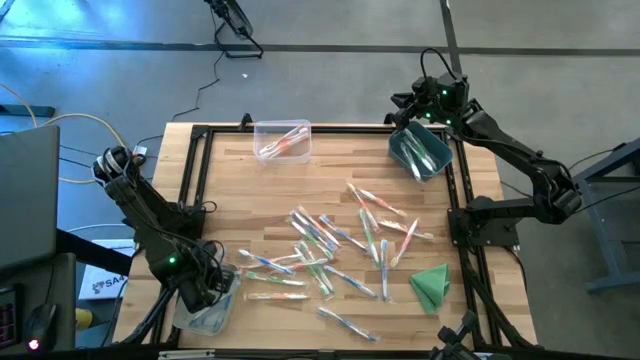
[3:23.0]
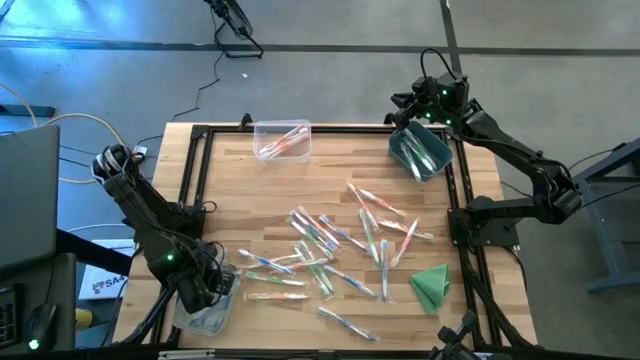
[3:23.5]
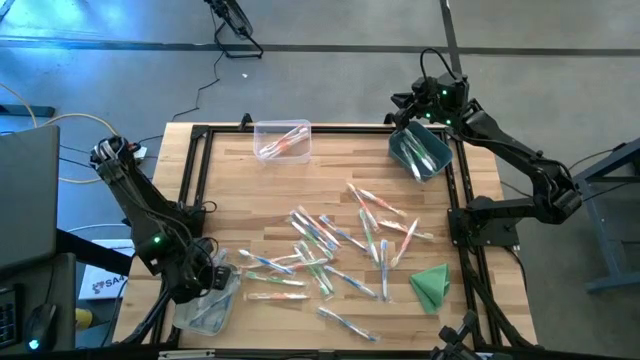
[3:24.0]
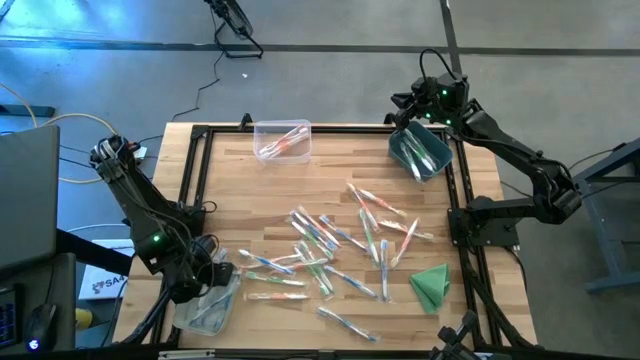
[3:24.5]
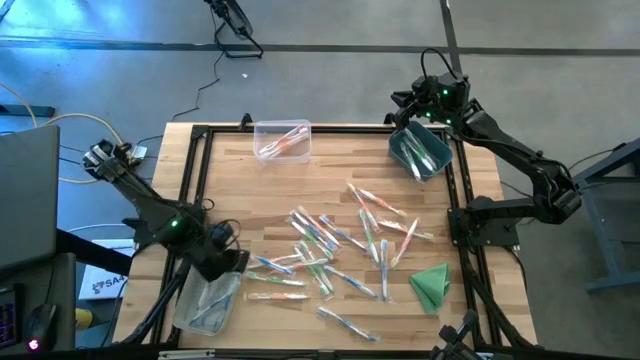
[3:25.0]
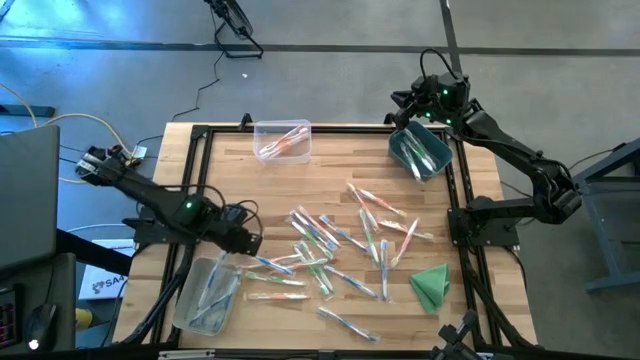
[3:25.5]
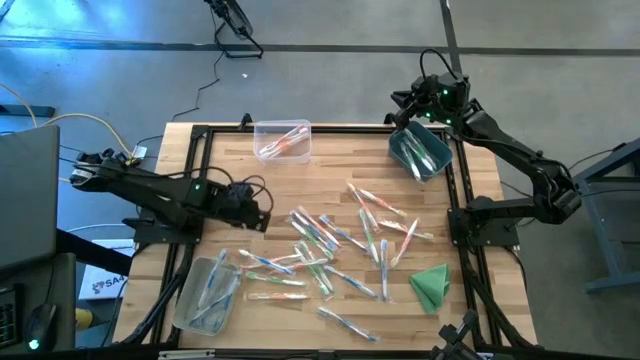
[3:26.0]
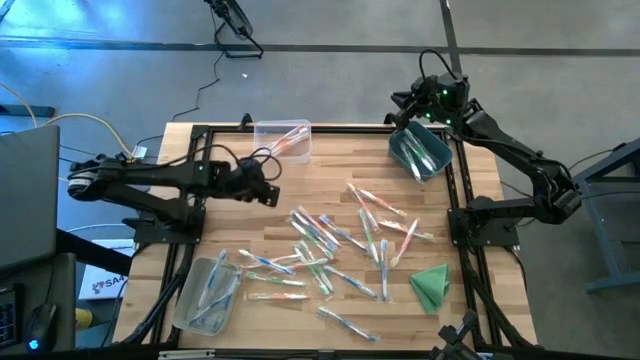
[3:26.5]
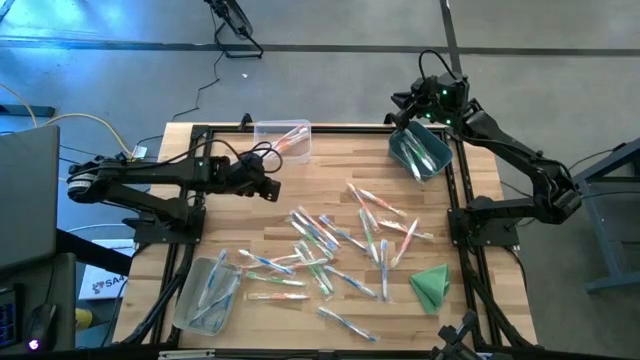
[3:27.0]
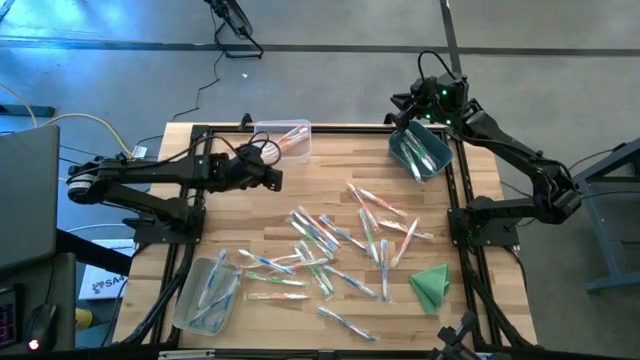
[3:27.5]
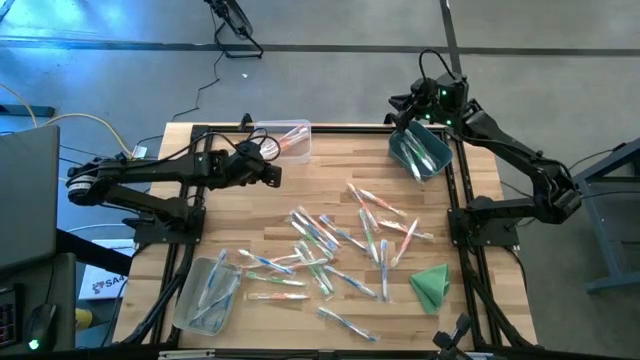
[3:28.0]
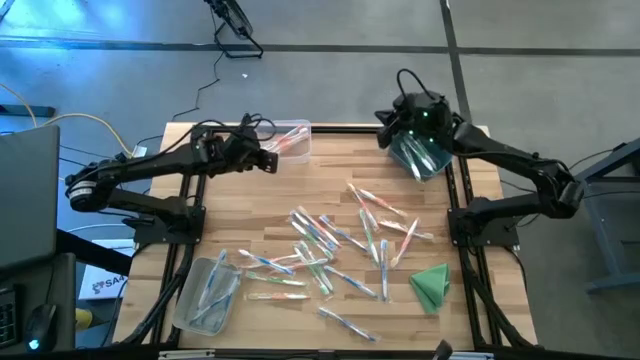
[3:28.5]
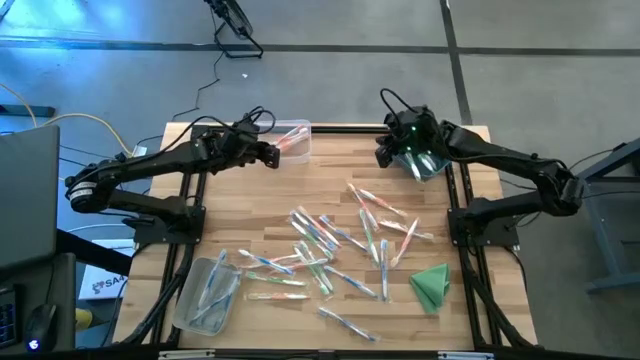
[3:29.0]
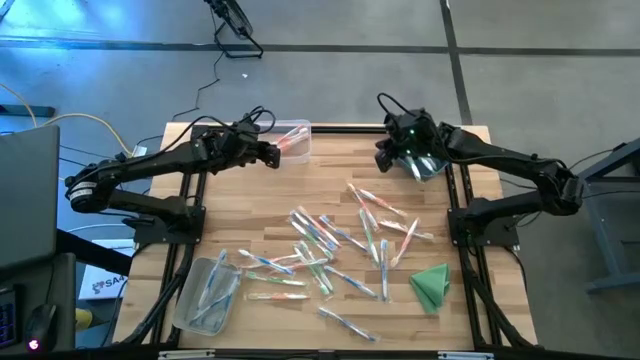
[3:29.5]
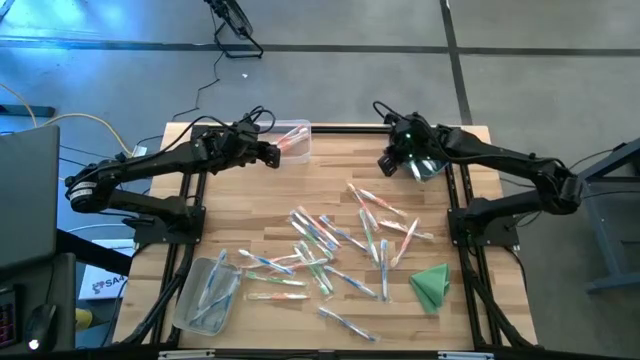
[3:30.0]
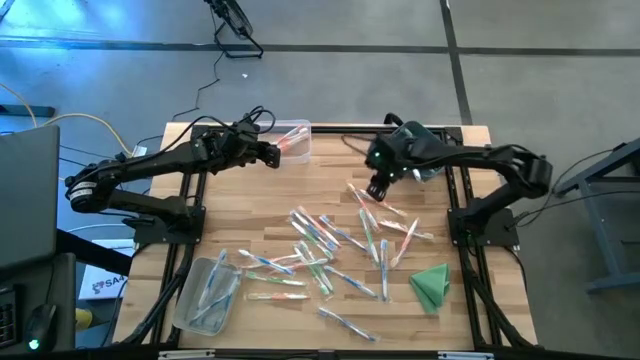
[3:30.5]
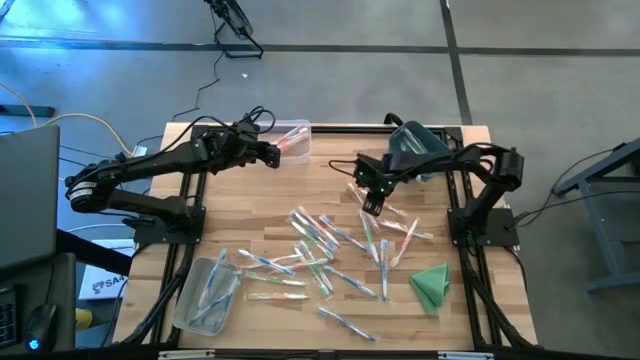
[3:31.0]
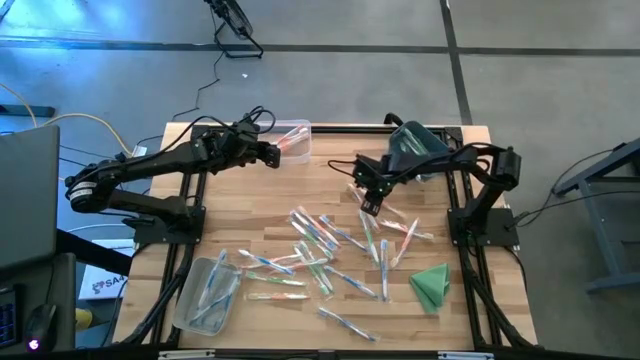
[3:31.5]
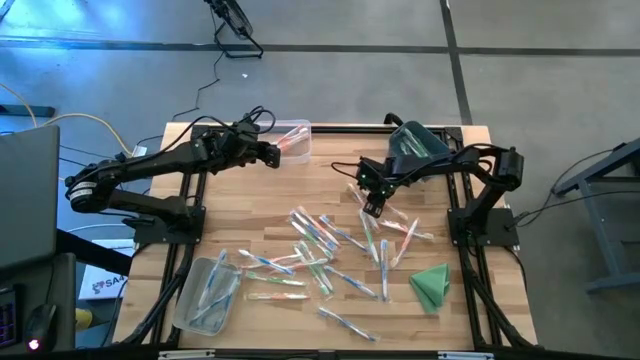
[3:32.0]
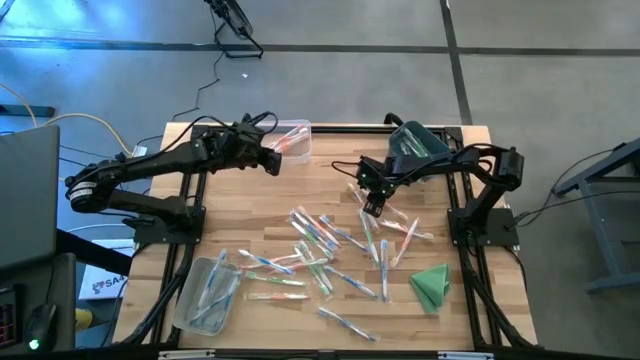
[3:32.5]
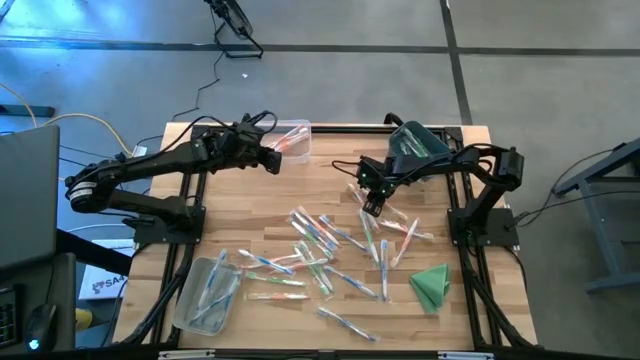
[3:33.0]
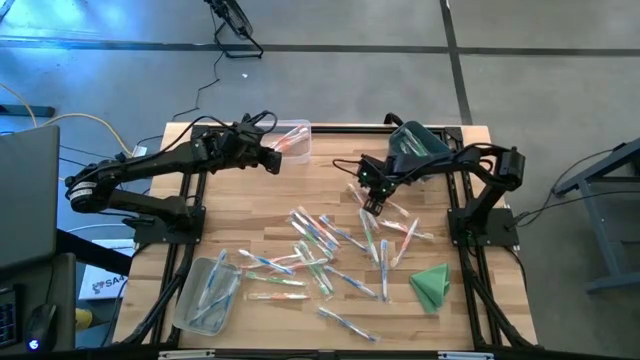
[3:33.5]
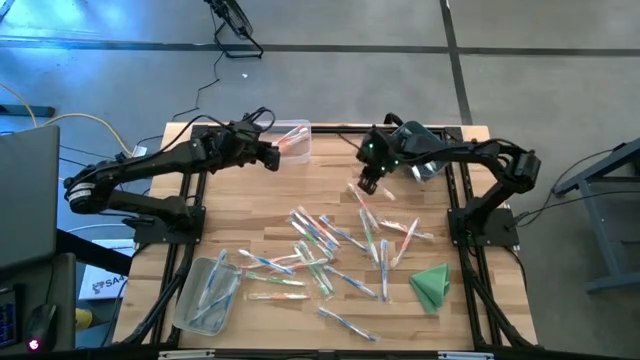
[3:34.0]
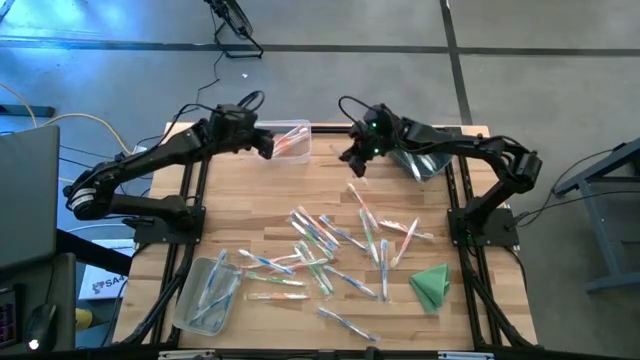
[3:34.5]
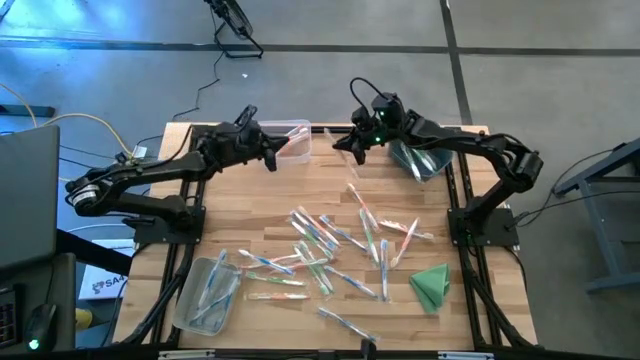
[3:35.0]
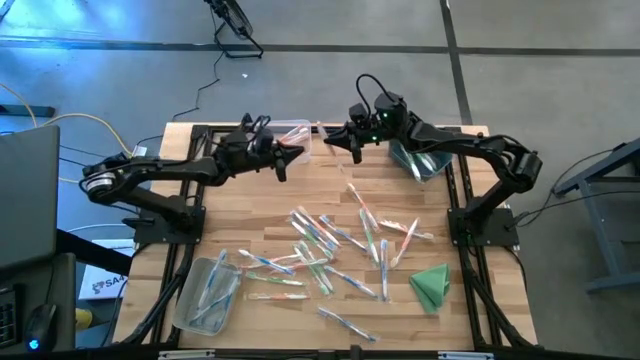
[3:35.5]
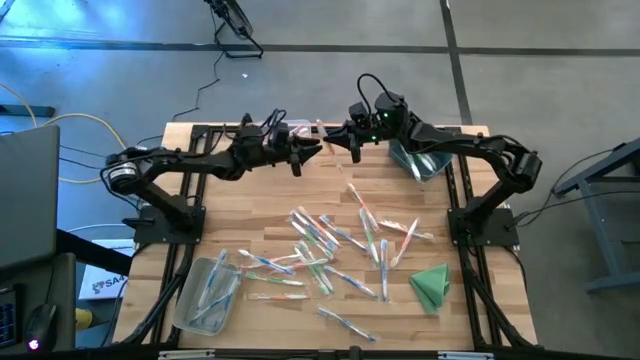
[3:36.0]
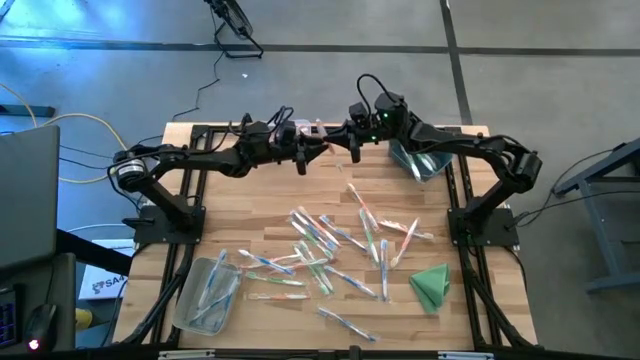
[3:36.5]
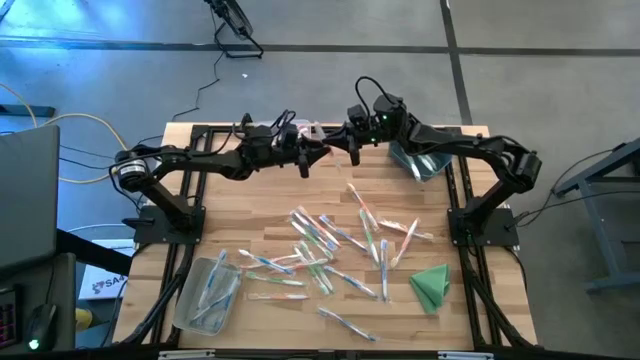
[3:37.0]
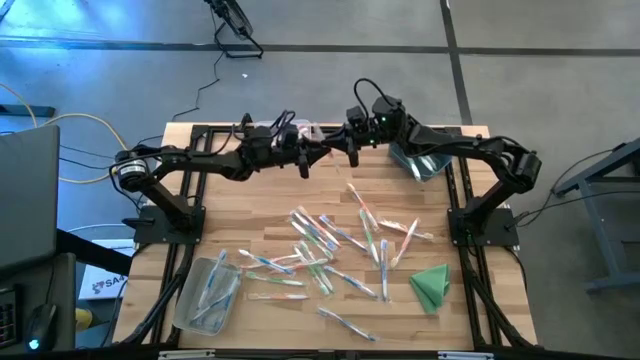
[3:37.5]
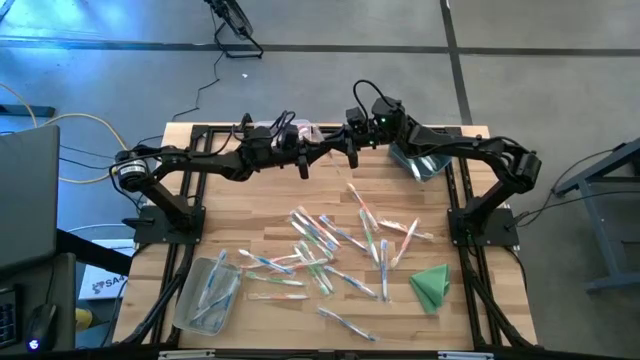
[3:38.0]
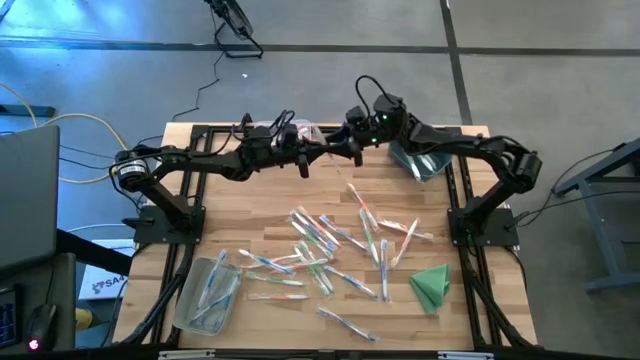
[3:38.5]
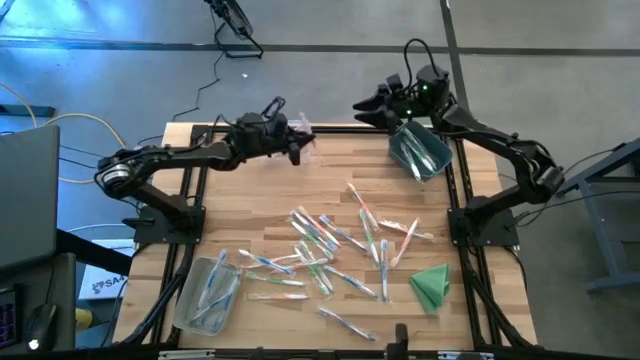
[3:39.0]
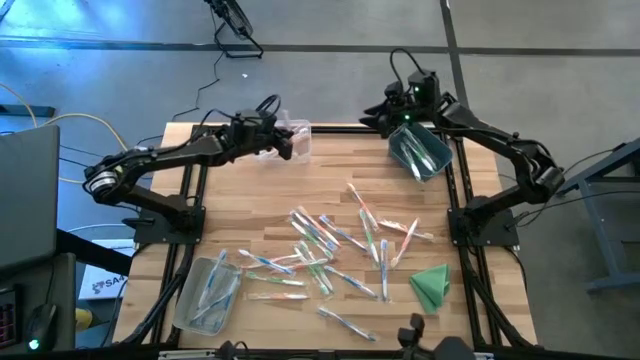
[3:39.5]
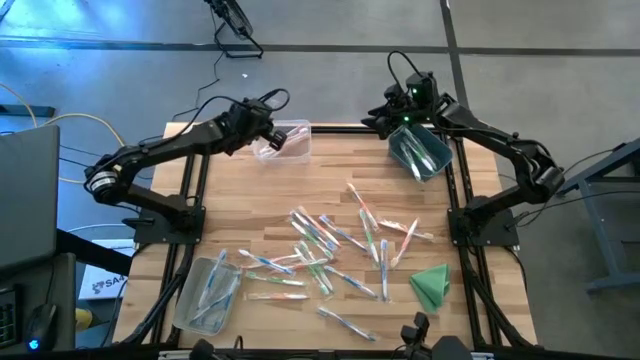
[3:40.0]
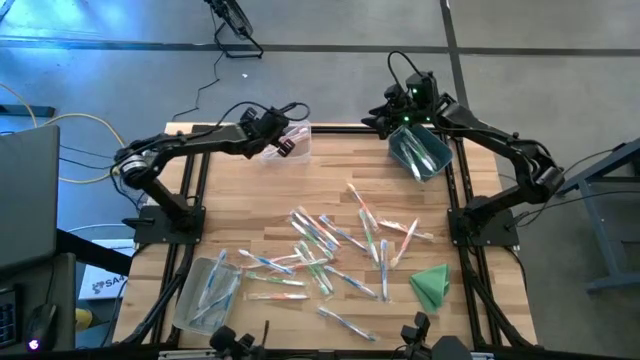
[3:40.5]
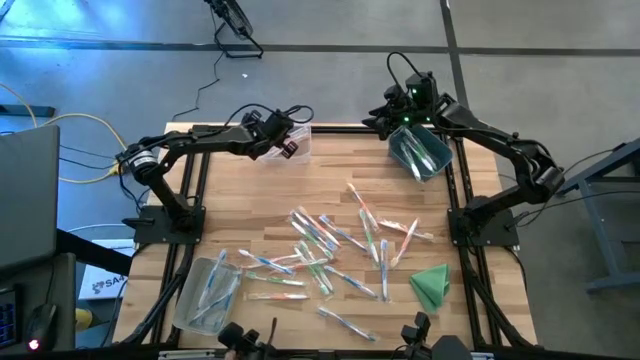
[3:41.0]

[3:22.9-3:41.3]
Task: Pick & Place Toothbrushes
Put the orange toothbrush into the transparent bin
